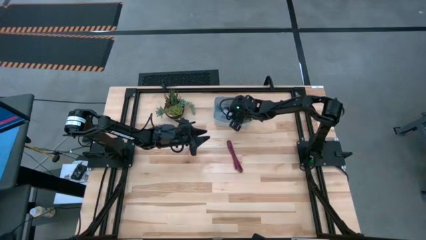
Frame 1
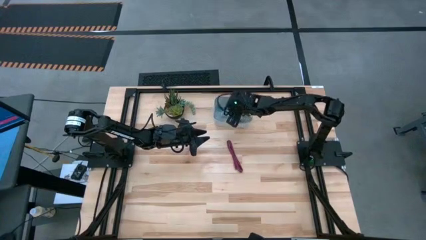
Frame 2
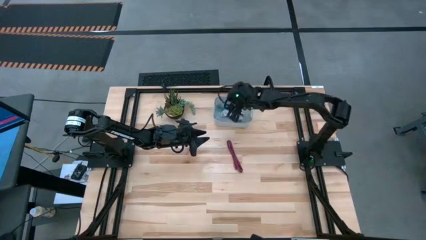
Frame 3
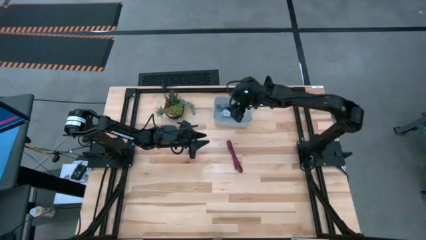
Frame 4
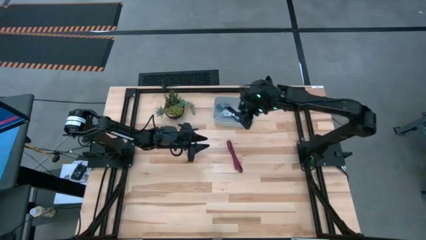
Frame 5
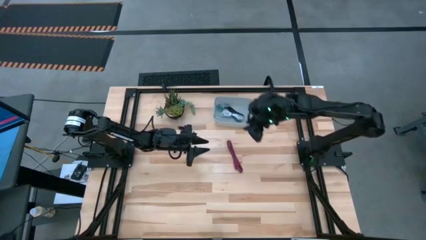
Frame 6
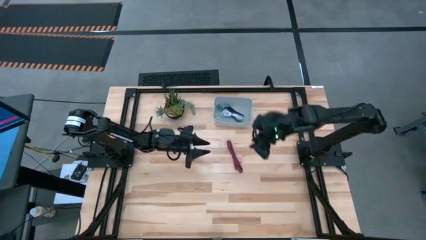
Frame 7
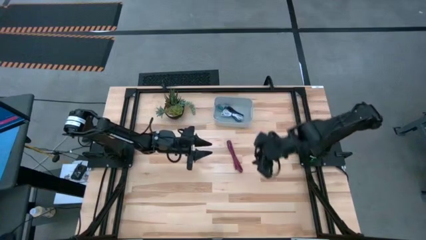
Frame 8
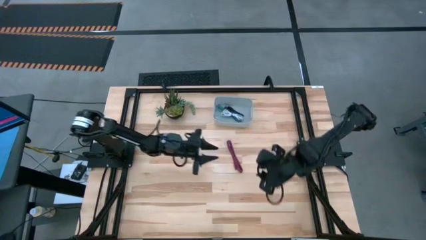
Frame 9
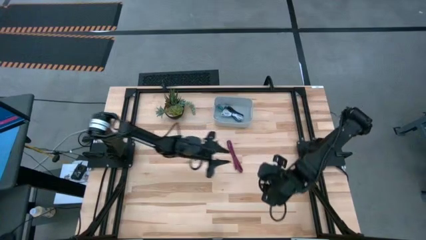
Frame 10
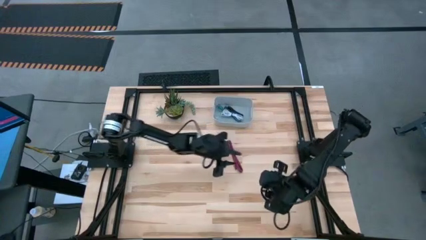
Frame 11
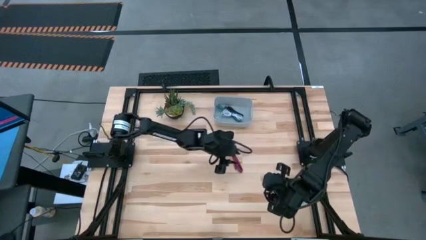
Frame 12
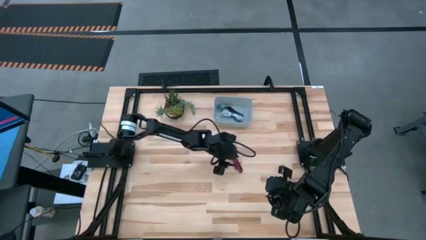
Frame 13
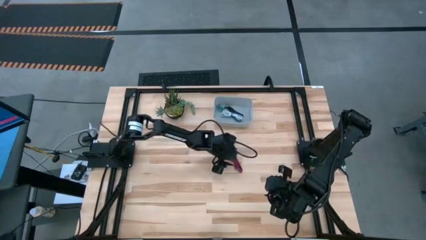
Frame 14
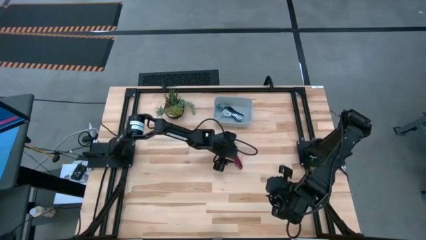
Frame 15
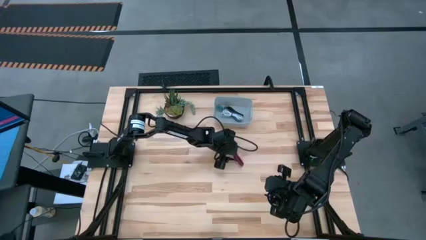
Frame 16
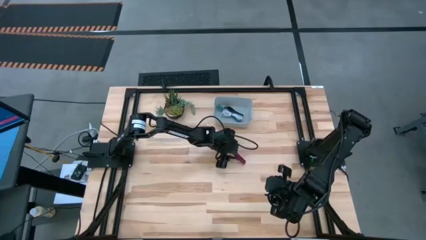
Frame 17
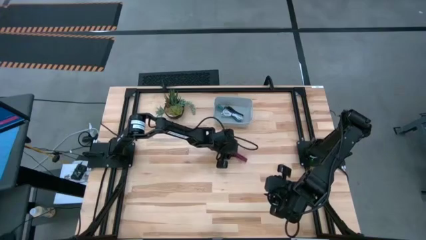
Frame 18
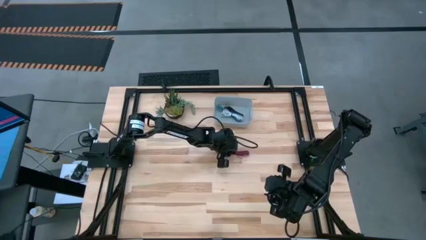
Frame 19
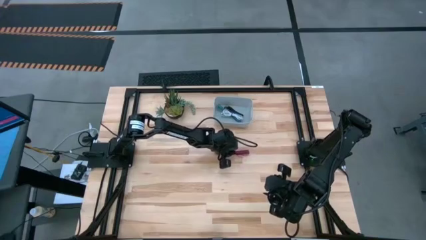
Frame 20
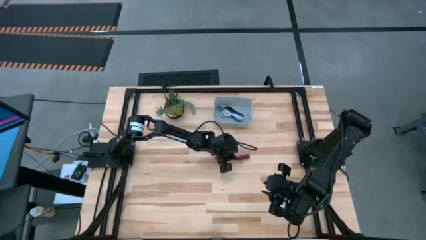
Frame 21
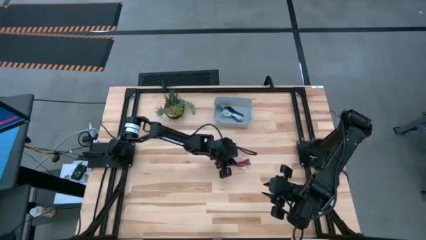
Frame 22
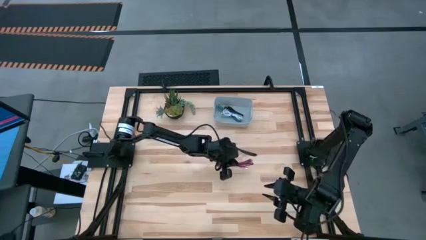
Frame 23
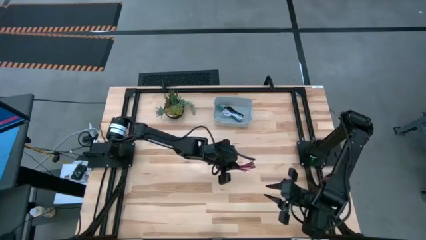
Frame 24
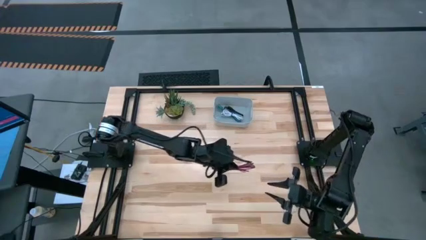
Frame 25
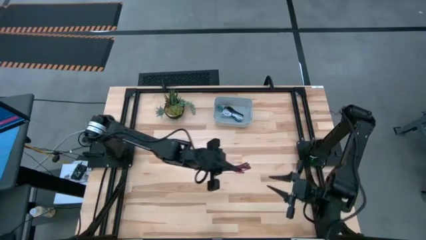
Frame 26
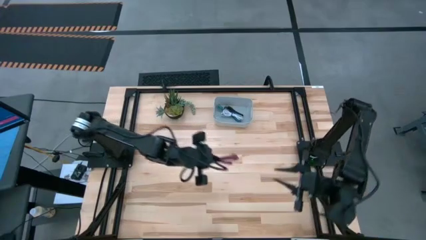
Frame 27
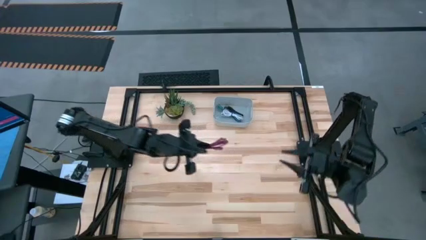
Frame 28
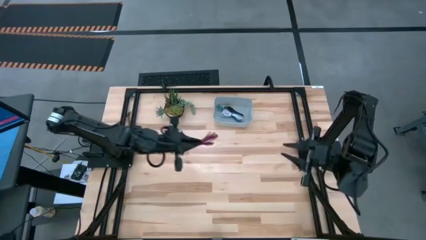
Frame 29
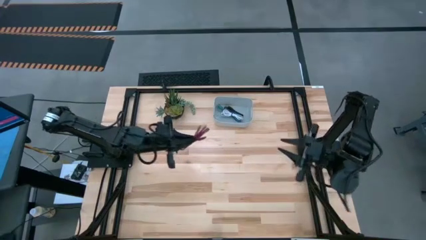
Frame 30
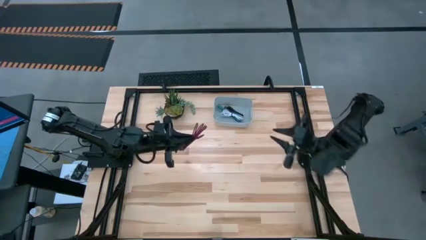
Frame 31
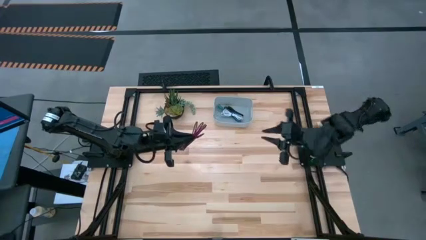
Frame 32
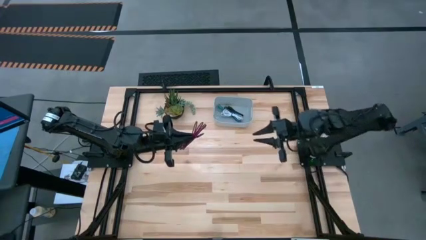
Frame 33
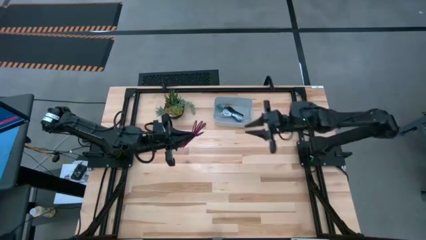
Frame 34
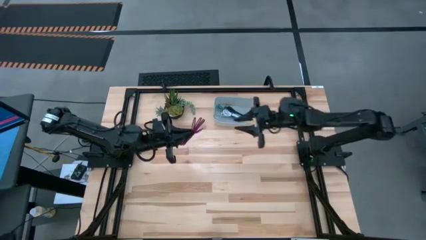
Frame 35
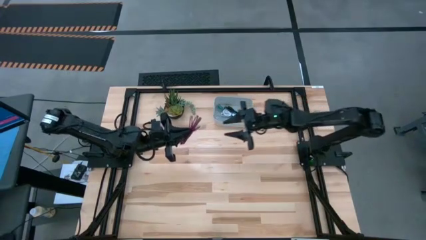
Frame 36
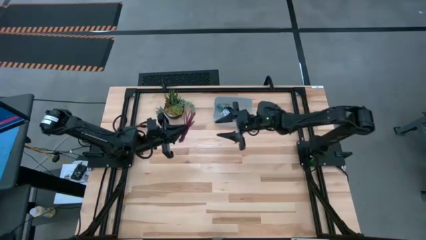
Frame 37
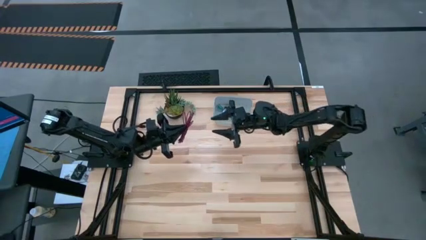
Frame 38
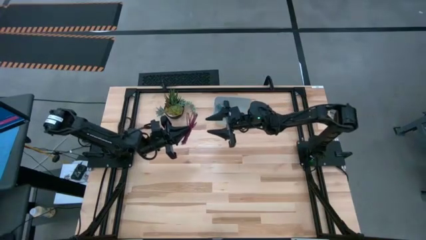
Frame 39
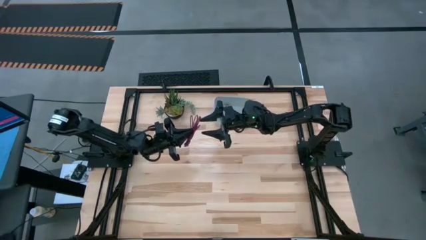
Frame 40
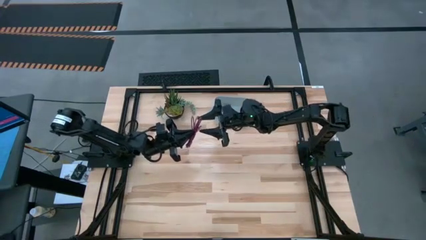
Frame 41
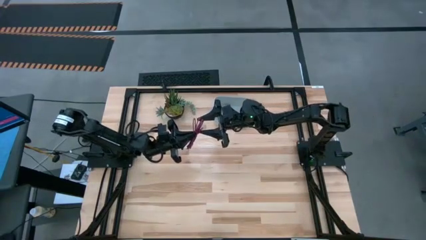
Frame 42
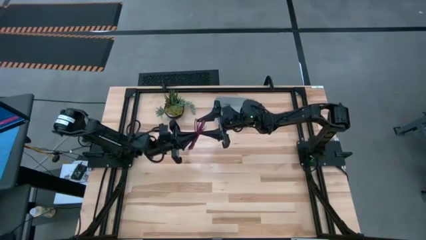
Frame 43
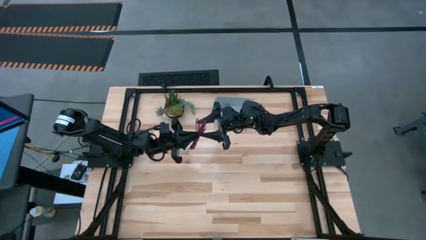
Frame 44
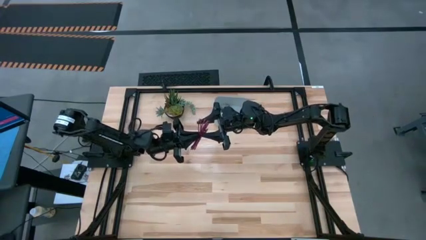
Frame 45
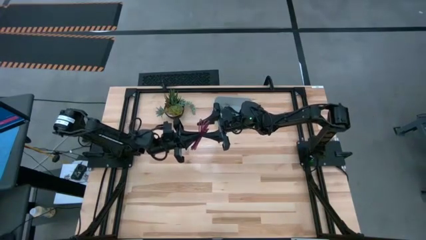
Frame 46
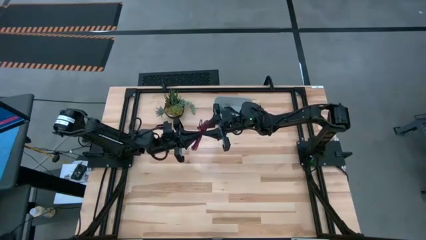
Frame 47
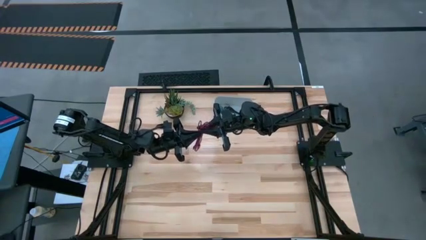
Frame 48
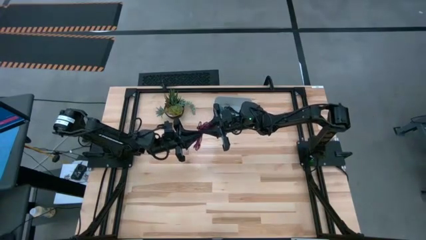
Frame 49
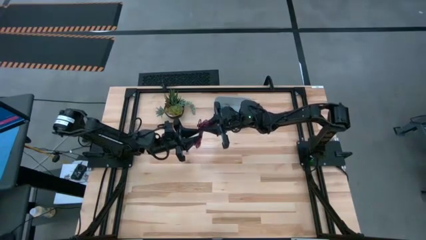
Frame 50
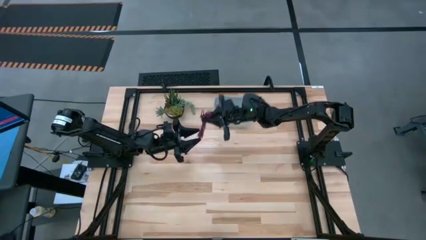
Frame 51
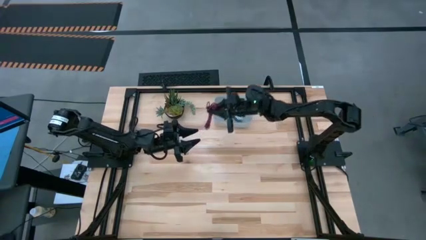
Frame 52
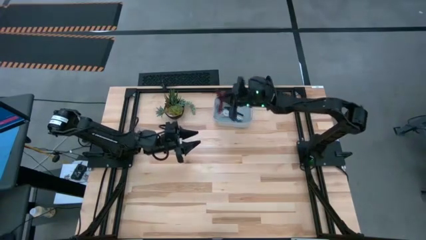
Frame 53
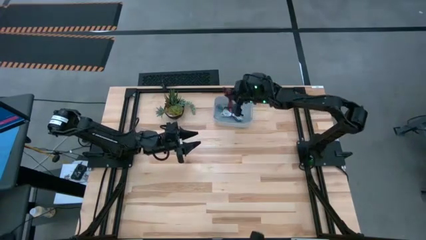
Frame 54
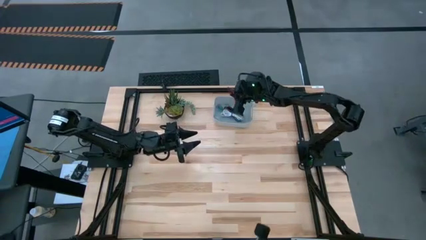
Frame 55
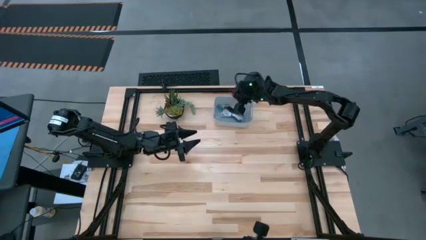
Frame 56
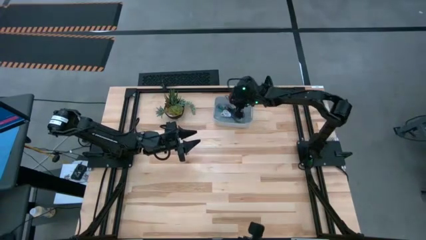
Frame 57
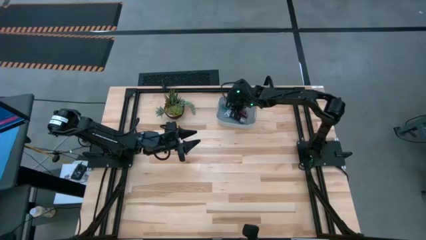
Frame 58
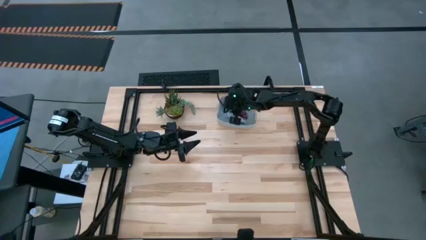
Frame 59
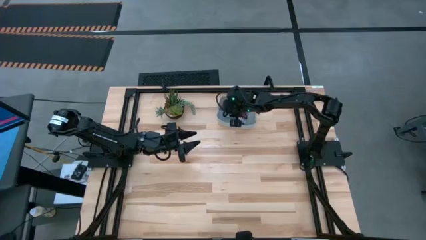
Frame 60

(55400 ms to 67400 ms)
Task: Pick and place USB-C Cables
Put the pink charger cable into the white bin

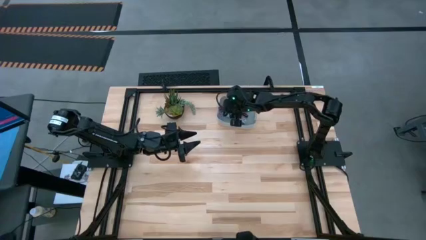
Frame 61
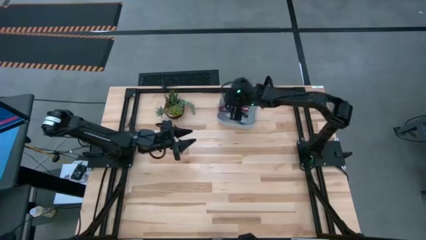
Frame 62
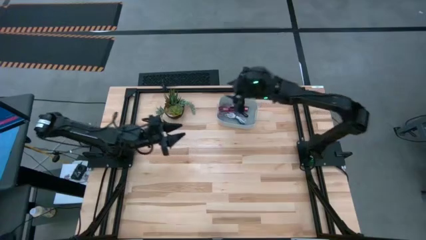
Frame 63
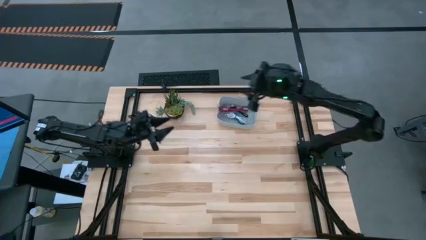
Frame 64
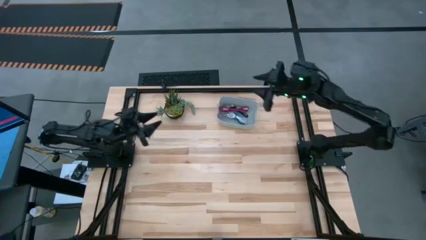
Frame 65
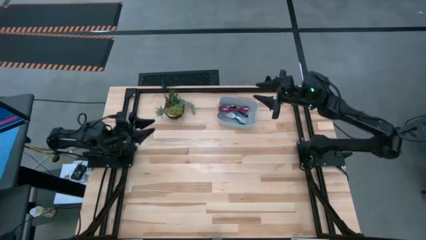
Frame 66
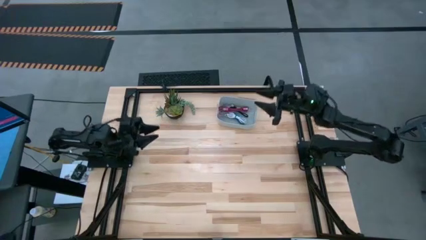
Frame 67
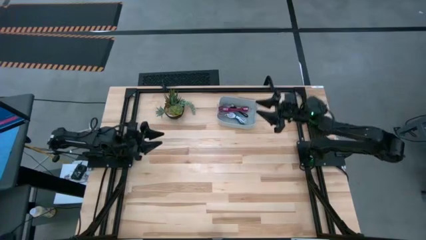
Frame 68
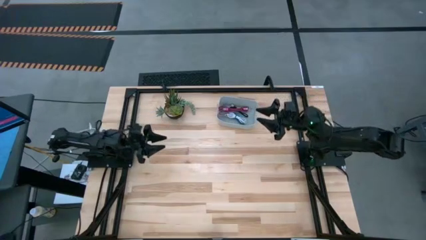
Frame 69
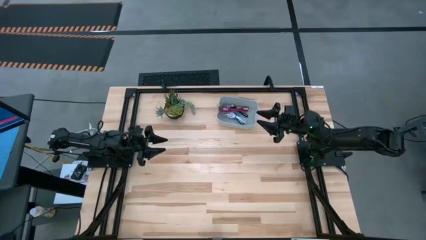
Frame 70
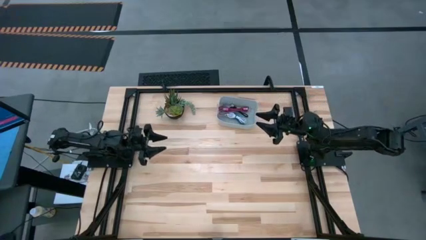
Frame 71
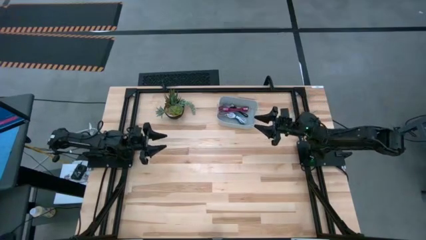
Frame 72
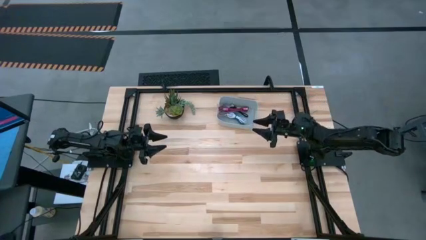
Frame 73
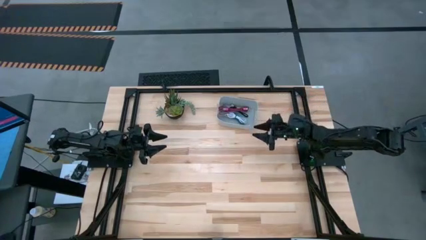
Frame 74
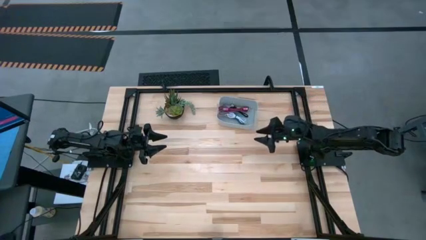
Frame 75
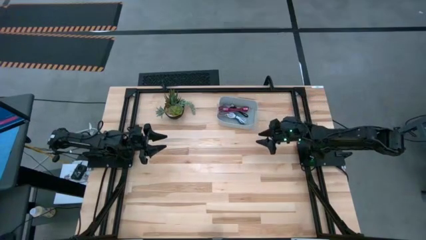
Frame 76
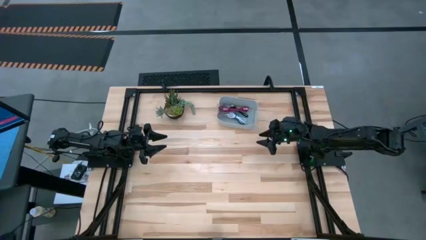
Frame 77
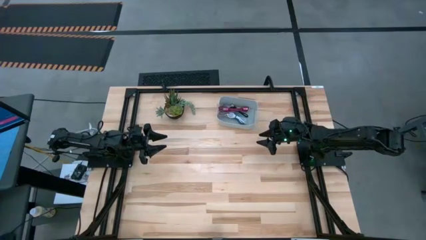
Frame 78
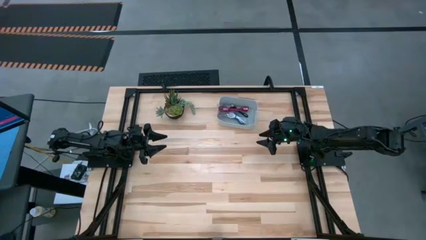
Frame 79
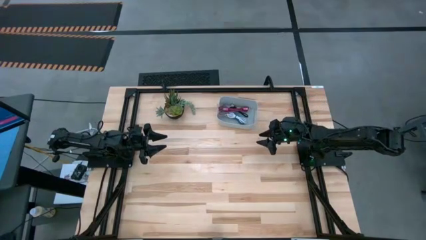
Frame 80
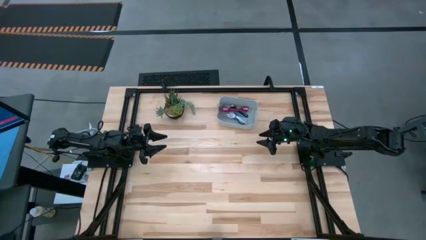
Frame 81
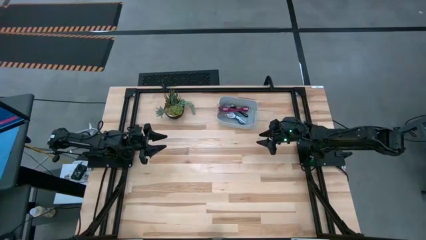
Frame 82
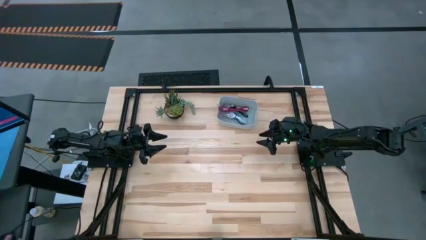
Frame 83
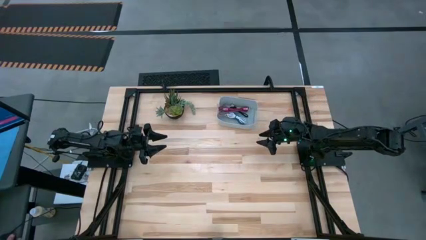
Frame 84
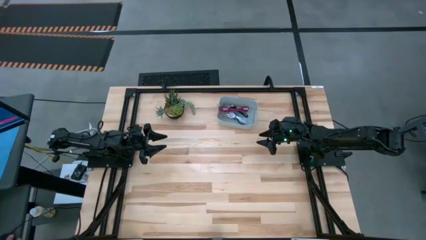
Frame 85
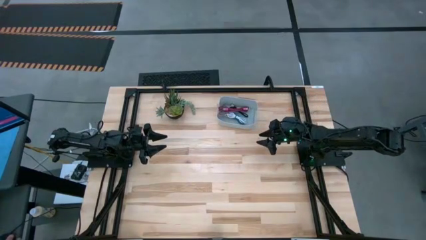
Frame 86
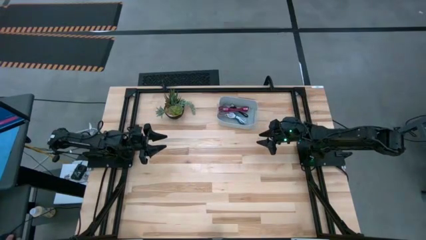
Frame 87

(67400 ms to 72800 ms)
Return to Home Position
